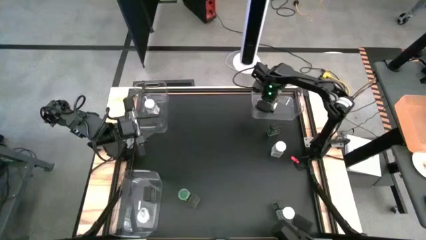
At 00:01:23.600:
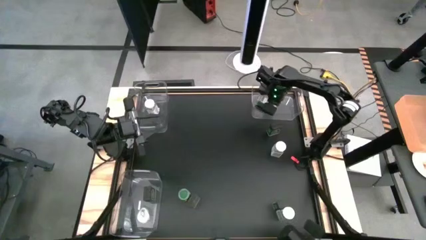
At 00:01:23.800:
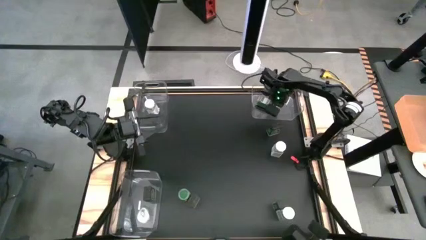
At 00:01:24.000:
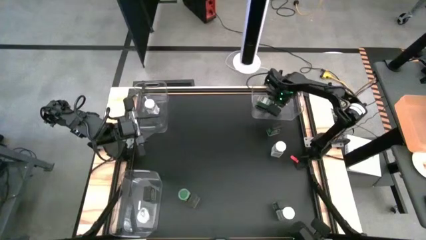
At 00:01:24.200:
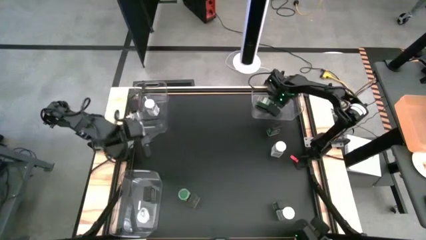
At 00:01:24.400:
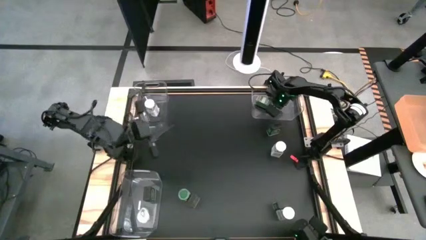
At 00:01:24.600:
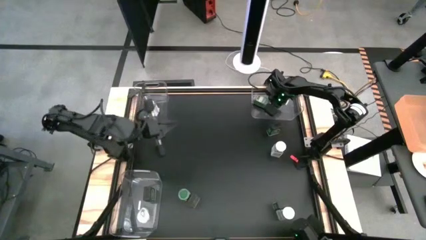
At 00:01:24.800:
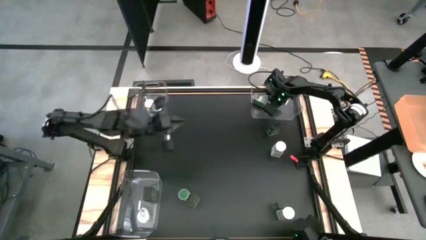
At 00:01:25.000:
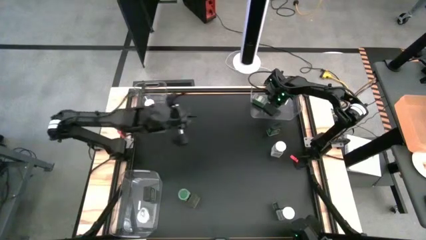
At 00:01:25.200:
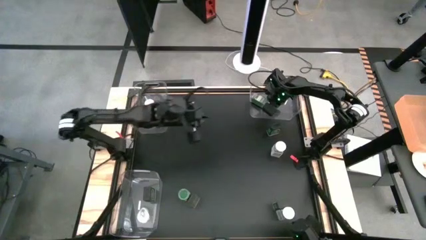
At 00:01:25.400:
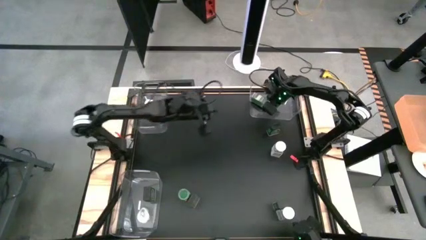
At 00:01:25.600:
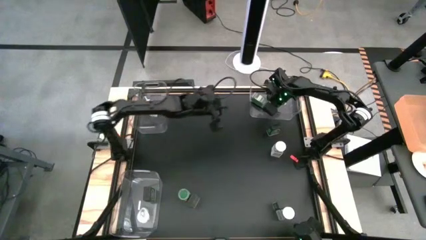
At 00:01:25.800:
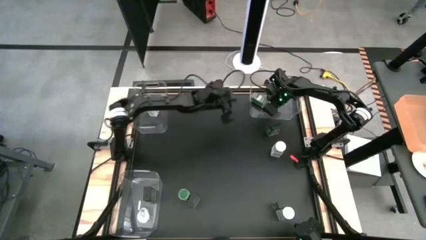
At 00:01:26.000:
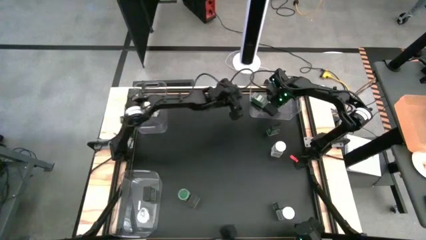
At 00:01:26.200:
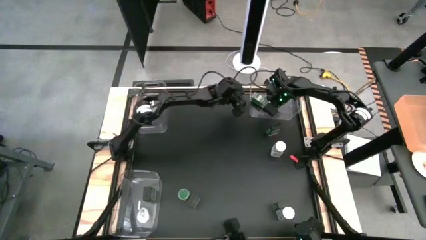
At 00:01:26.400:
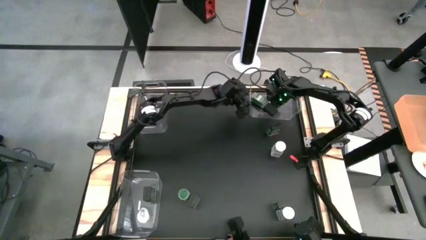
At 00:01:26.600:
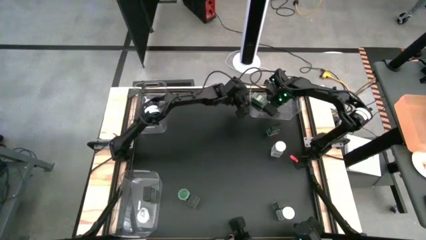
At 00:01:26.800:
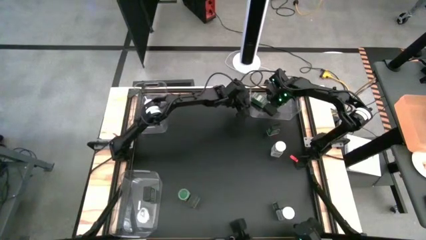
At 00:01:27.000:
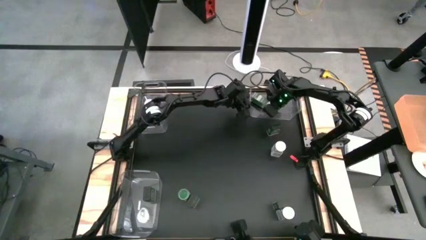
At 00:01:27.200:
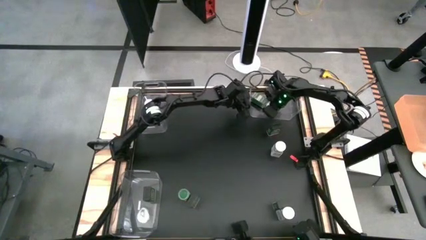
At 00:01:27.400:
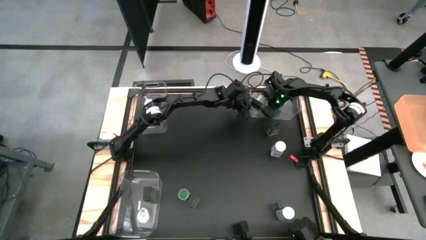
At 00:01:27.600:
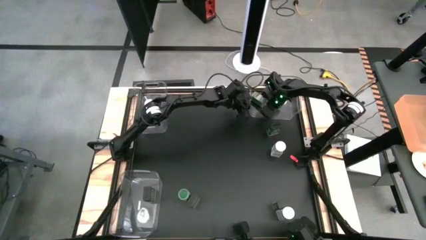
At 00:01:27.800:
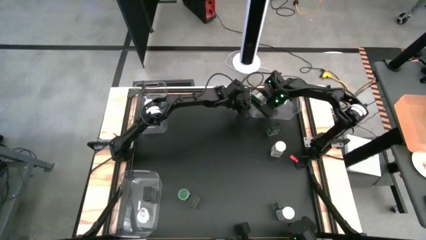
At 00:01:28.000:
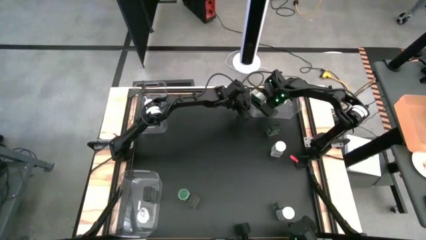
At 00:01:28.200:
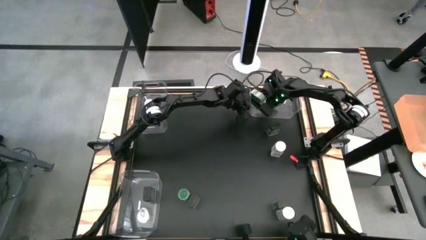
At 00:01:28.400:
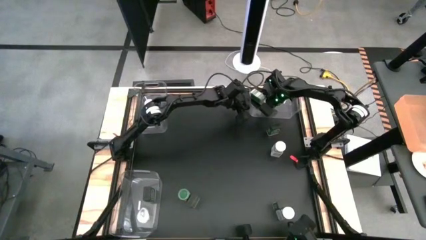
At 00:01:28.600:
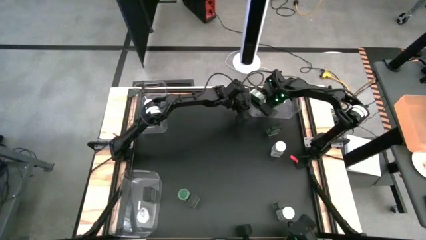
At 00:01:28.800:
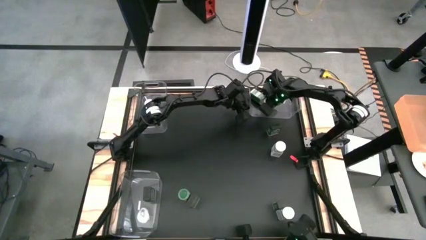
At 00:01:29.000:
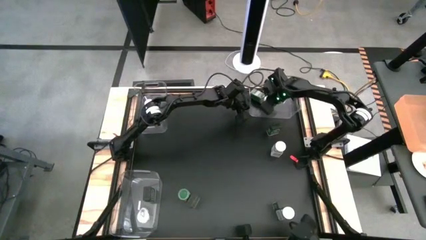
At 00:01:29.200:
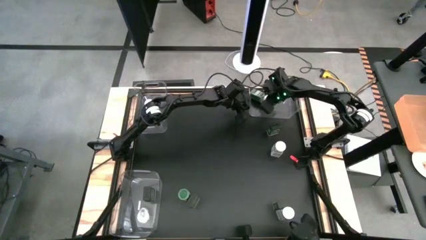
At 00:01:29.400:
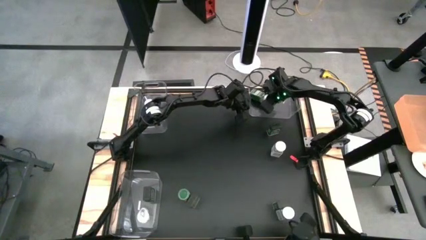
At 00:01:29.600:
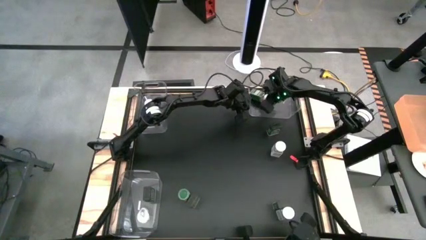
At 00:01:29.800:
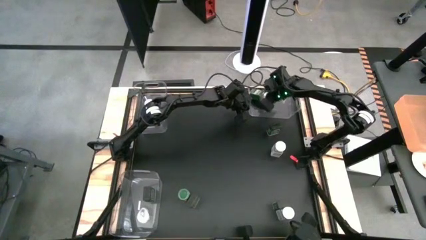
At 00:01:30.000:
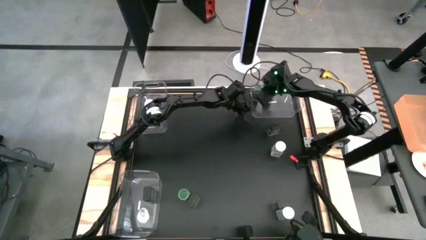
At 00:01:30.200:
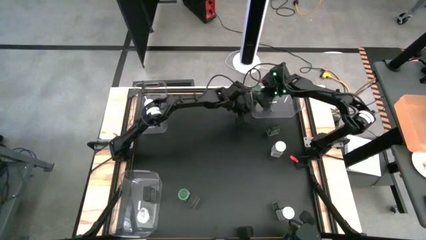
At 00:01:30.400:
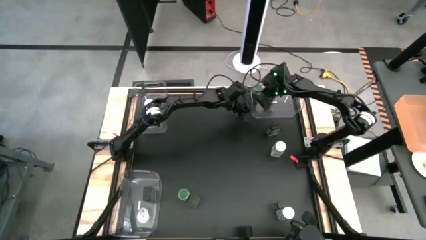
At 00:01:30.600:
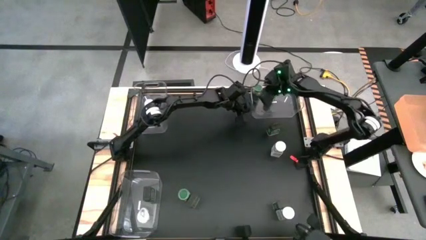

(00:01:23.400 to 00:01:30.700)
Task: Sort spices by type
Put the top left green seasoning bottle into the top right transparent bin

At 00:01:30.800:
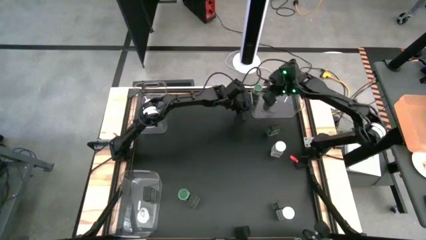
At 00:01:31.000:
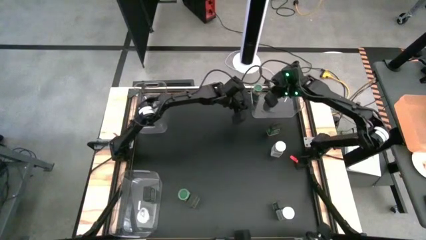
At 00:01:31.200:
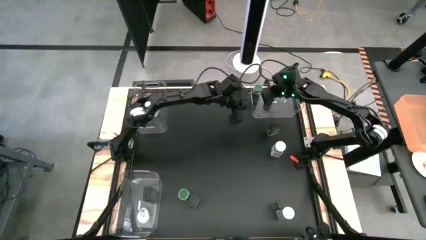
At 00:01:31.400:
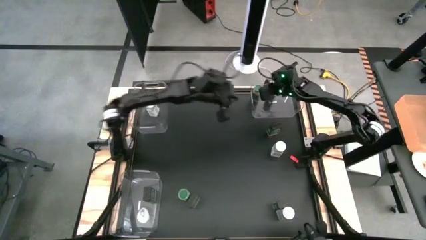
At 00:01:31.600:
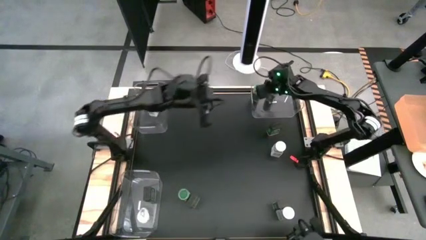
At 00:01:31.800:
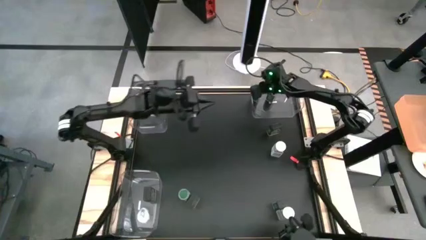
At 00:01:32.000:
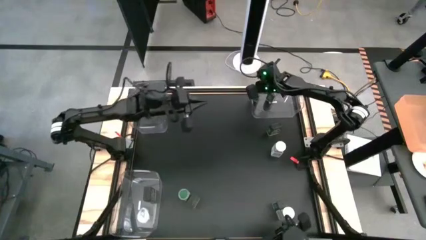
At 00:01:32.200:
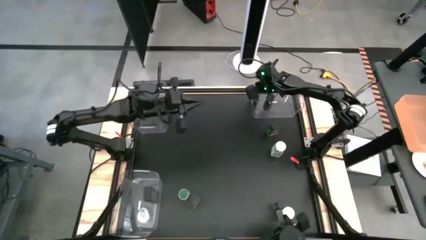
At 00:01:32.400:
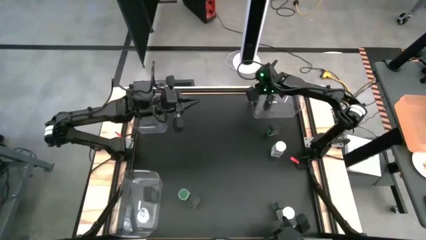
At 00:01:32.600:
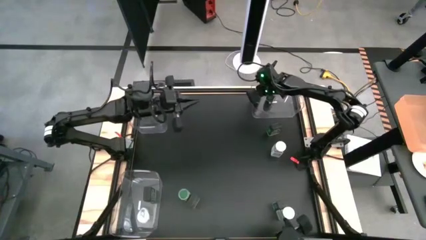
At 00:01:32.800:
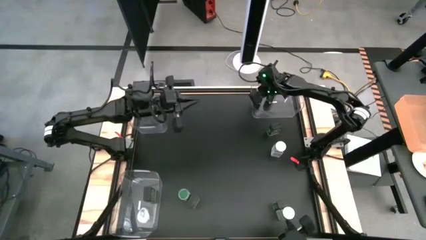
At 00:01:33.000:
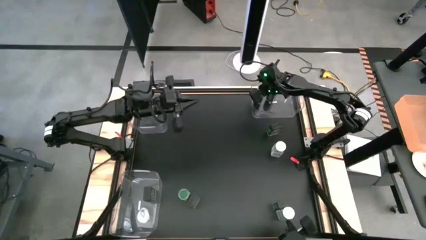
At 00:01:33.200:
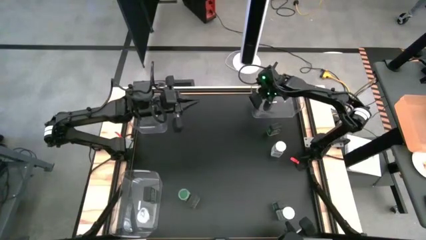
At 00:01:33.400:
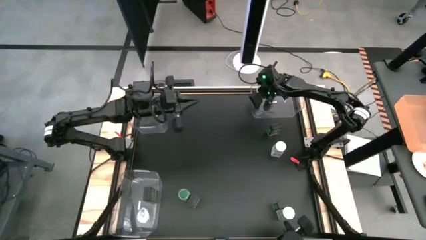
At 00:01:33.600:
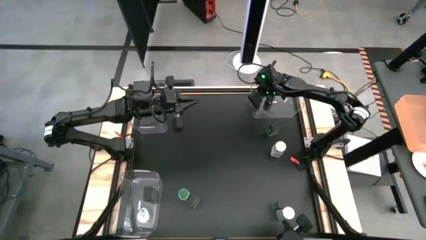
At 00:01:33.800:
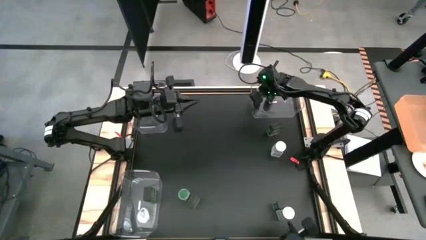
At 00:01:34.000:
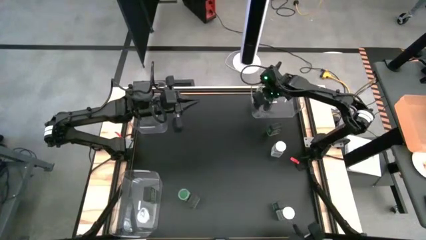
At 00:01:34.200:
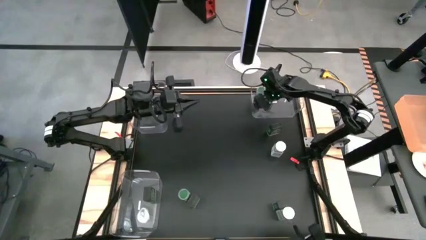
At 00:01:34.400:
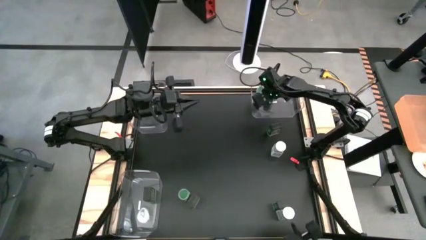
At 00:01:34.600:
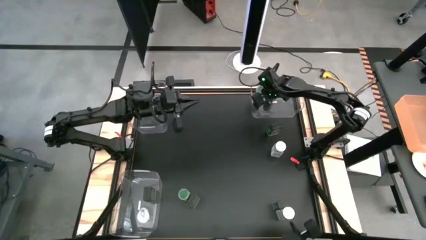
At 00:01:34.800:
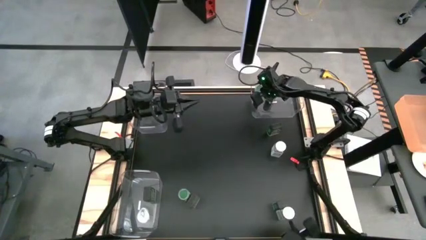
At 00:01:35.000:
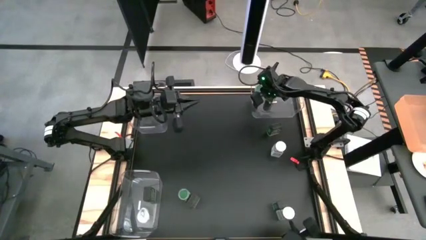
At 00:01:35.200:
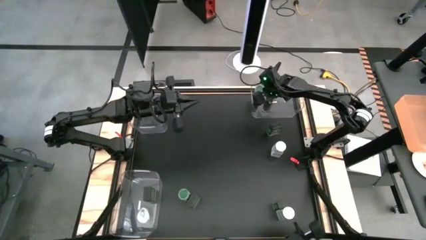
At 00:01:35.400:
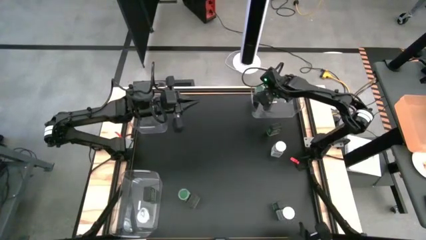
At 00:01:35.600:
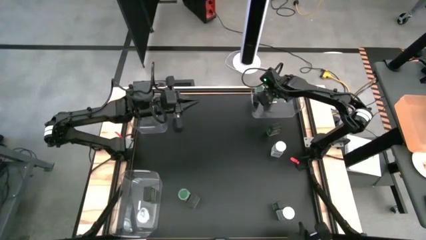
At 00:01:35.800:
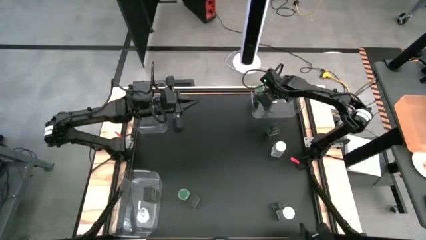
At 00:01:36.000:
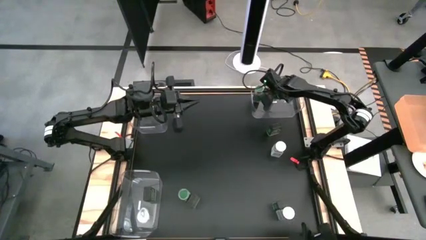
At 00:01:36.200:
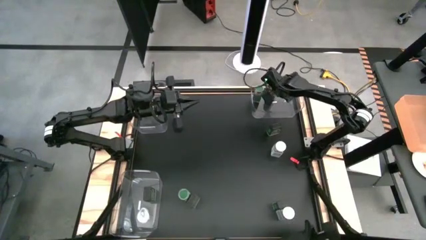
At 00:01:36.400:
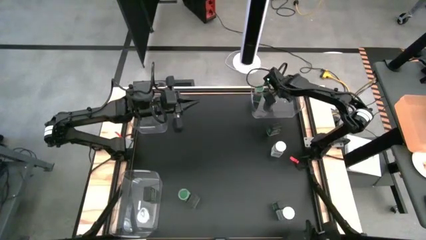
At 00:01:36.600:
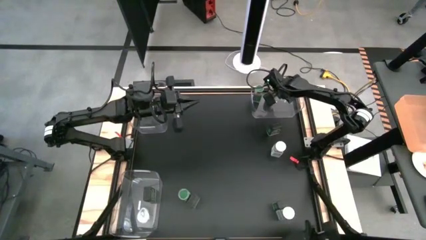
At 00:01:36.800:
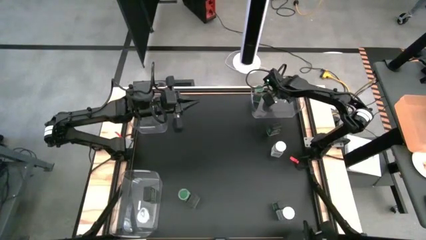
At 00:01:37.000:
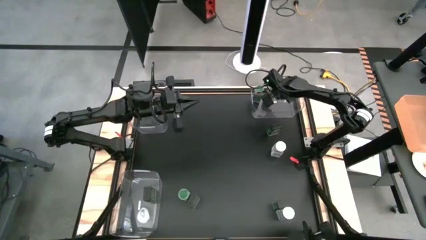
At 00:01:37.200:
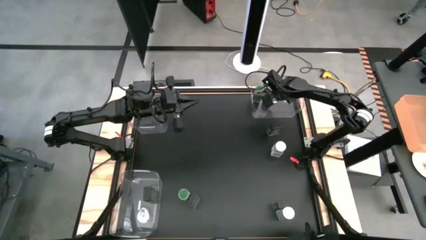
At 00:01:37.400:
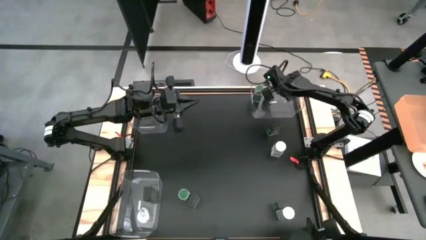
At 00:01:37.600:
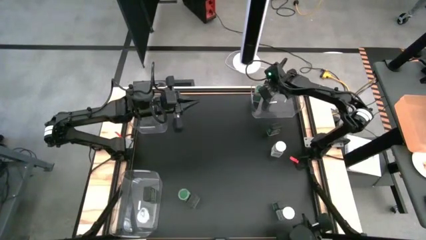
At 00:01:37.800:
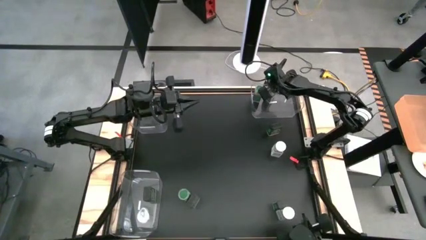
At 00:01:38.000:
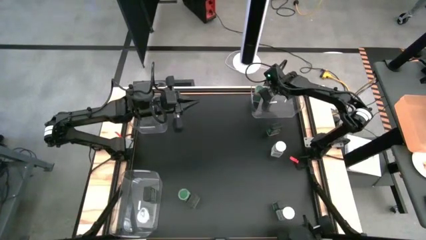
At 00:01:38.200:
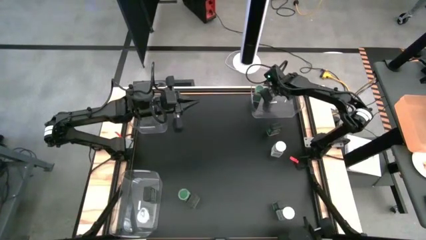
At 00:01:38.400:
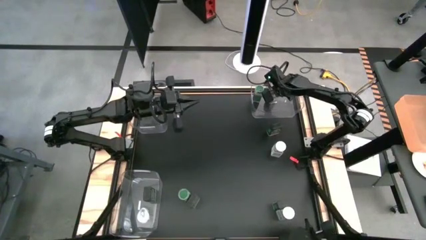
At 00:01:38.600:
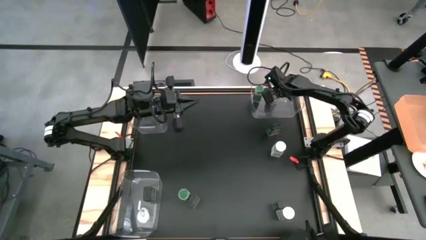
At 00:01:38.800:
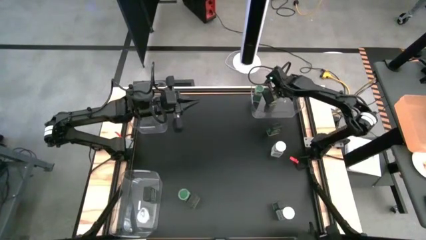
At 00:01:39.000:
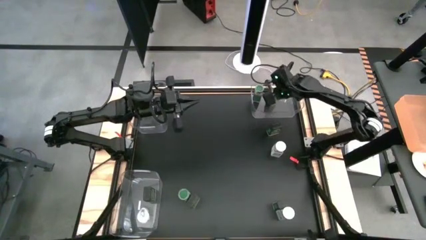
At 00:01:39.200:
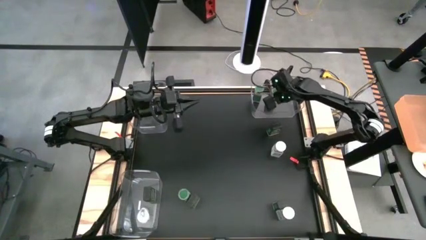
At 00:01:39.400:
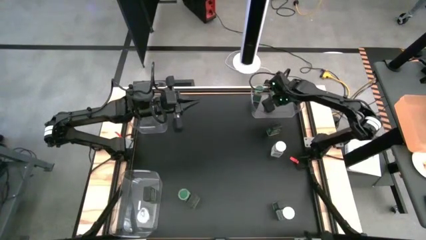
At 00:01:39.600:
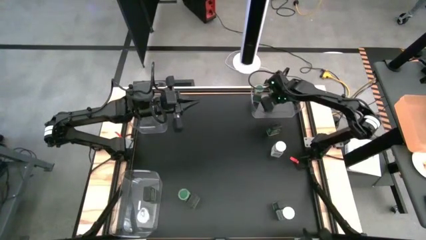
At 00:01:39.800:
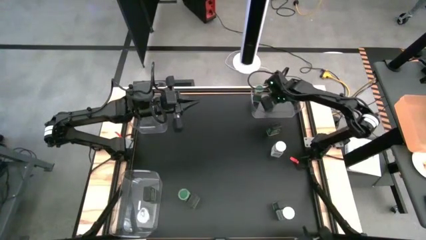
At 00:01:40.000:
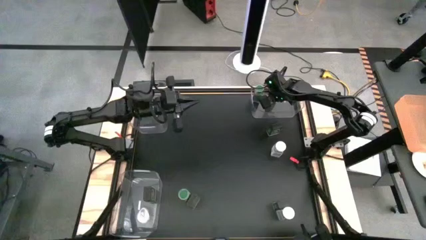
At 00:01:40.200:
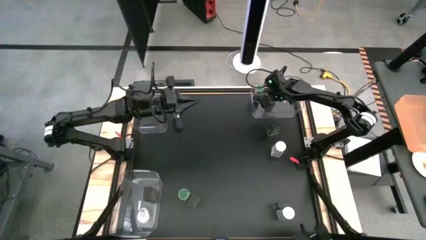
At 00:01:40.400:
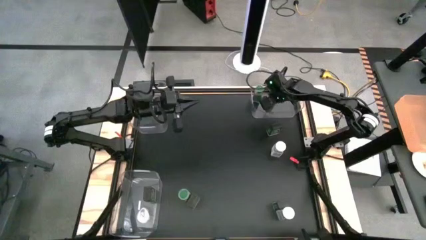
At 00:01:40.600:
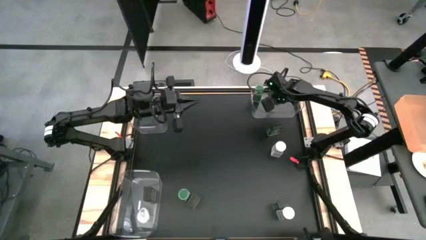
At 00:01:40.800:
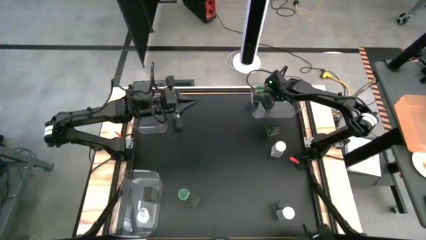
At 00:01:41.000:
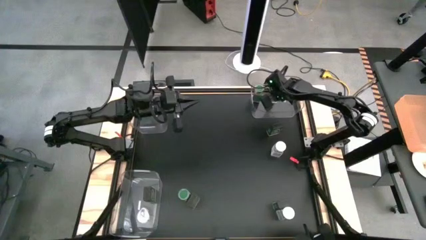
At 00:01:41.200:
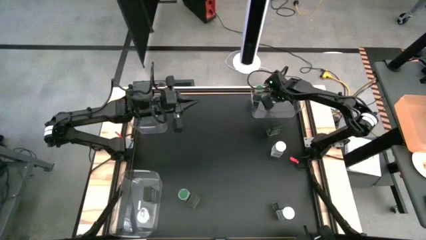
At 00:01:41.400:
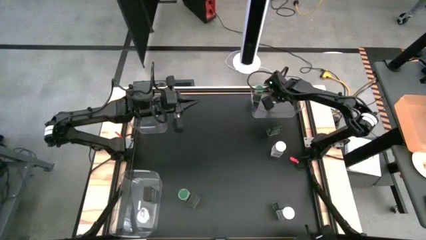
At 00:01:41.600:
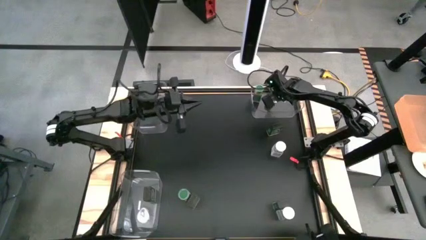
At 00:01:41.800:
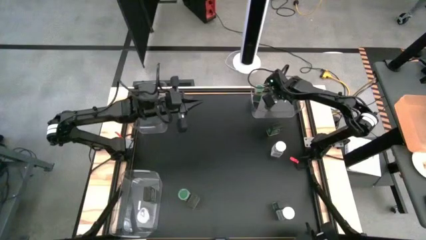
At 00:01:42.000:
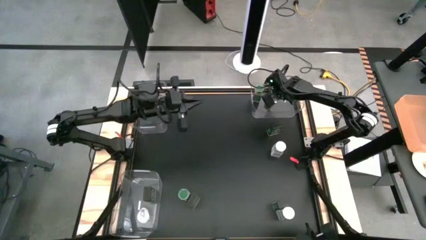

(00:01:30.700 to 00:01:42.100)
Adjust the green seasoning bottles in the top right transparent bin
